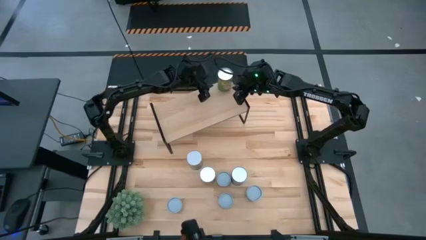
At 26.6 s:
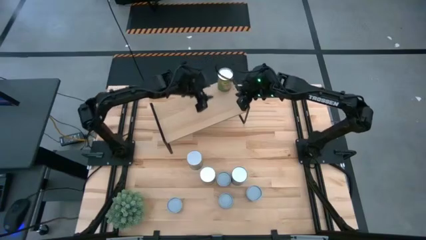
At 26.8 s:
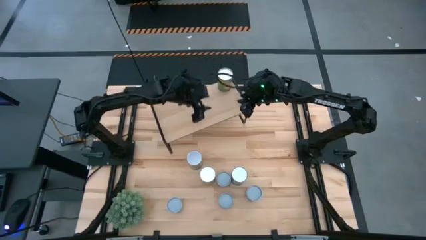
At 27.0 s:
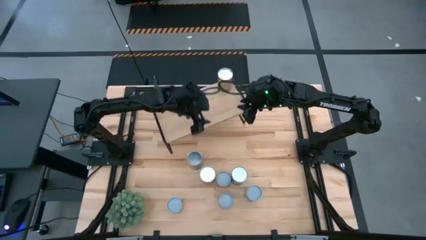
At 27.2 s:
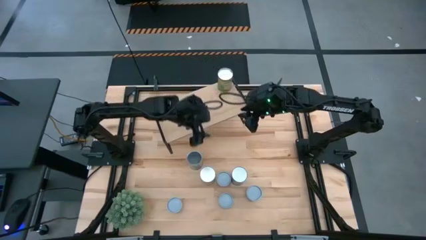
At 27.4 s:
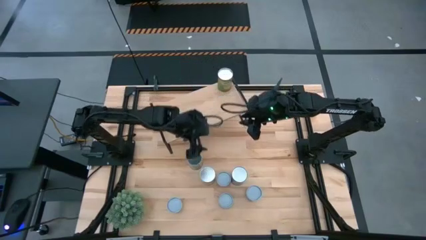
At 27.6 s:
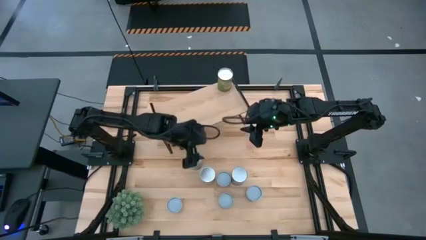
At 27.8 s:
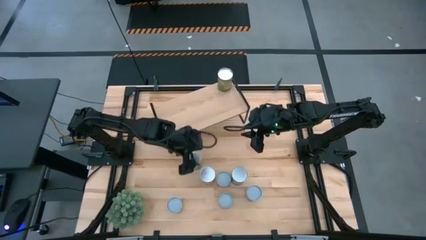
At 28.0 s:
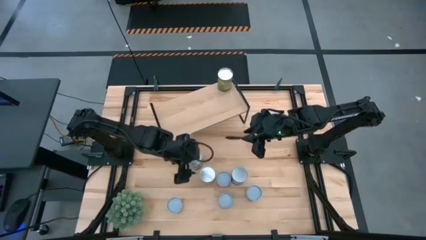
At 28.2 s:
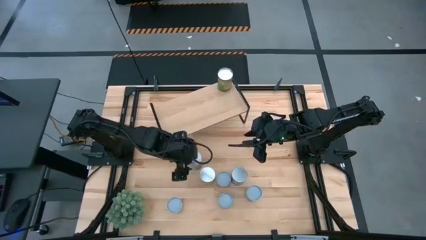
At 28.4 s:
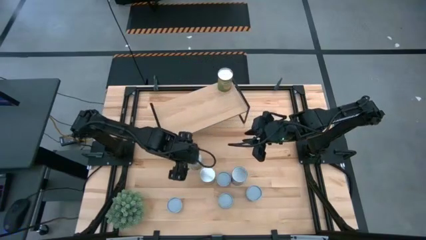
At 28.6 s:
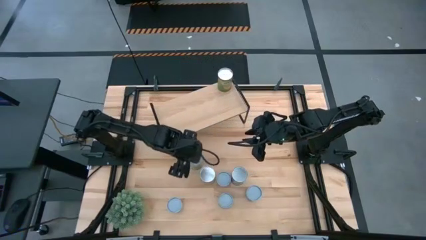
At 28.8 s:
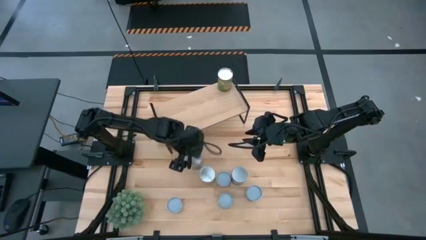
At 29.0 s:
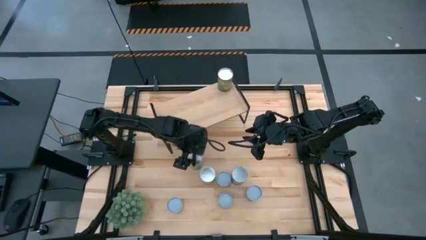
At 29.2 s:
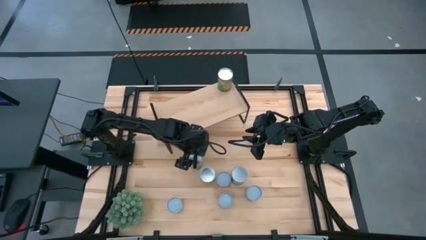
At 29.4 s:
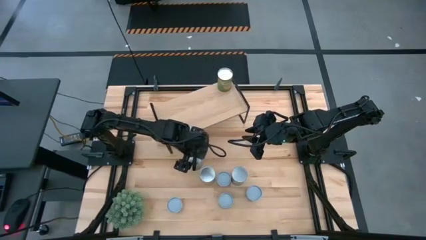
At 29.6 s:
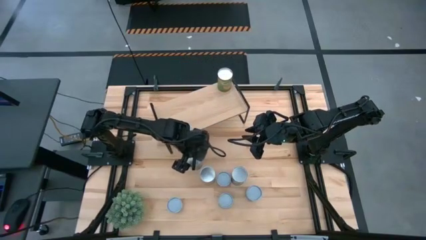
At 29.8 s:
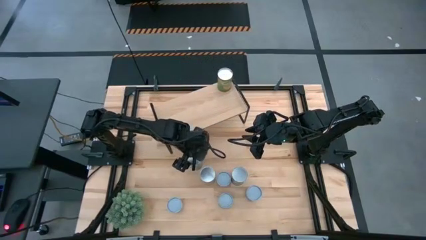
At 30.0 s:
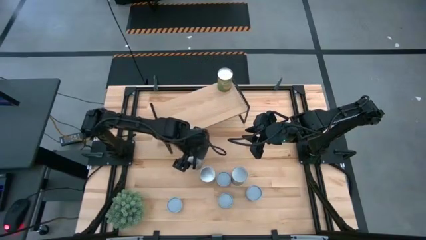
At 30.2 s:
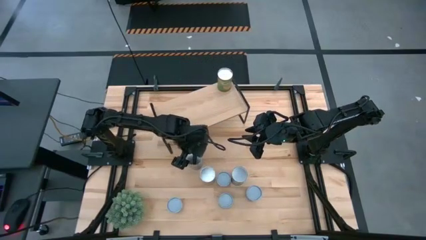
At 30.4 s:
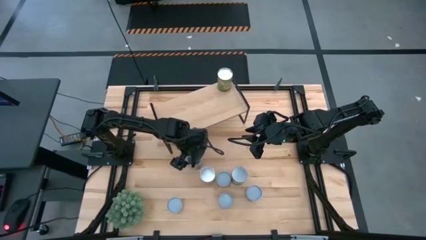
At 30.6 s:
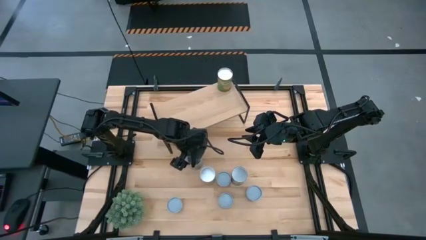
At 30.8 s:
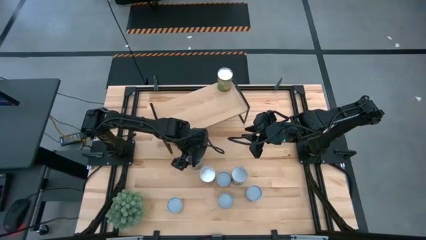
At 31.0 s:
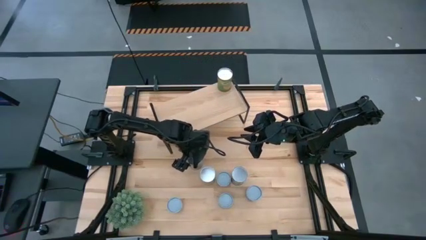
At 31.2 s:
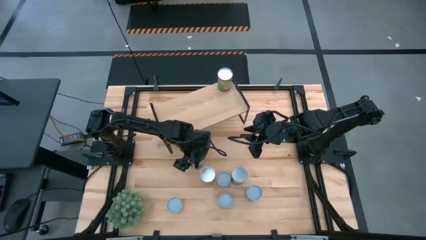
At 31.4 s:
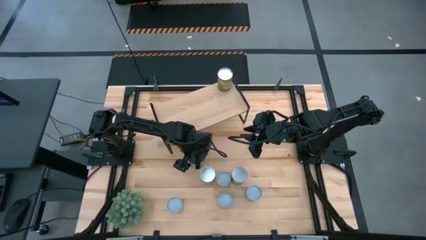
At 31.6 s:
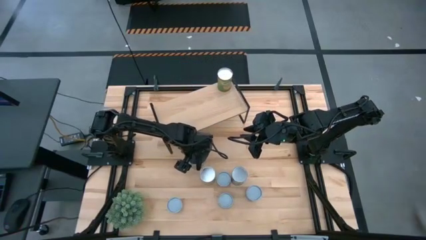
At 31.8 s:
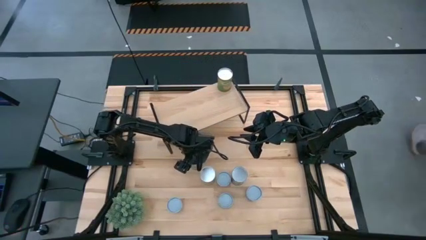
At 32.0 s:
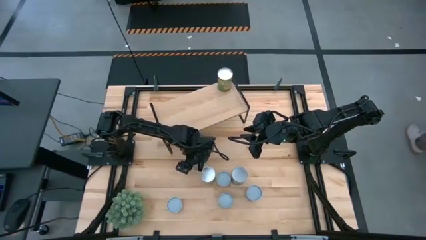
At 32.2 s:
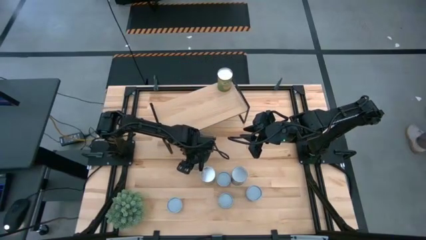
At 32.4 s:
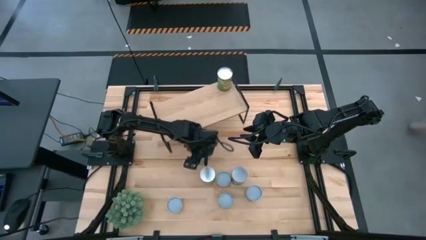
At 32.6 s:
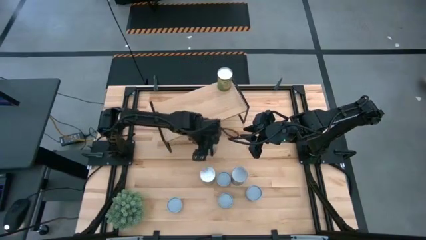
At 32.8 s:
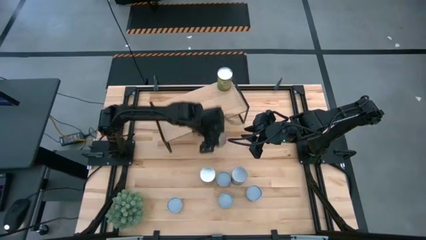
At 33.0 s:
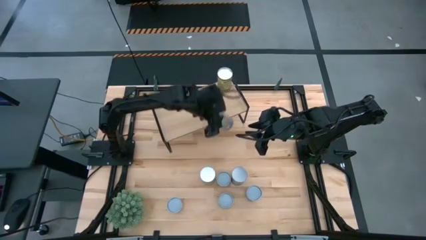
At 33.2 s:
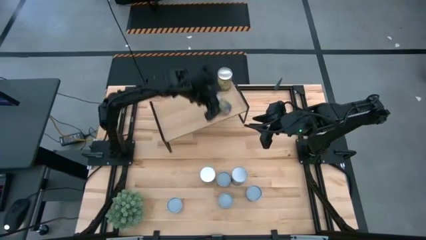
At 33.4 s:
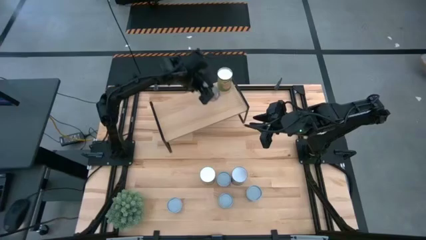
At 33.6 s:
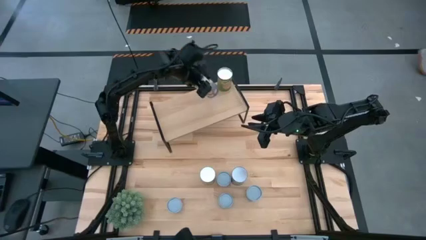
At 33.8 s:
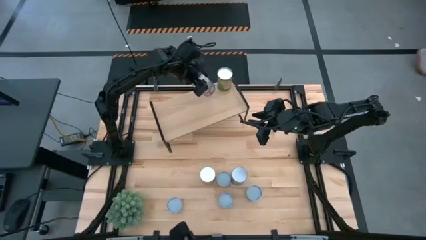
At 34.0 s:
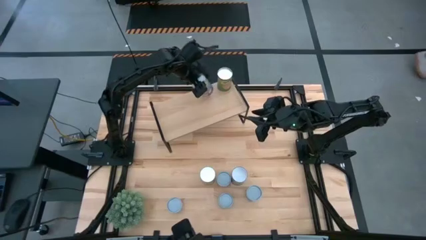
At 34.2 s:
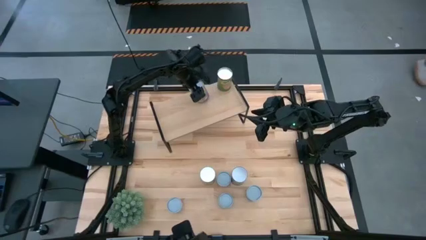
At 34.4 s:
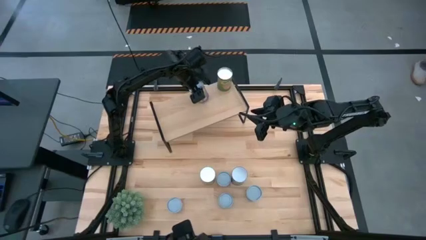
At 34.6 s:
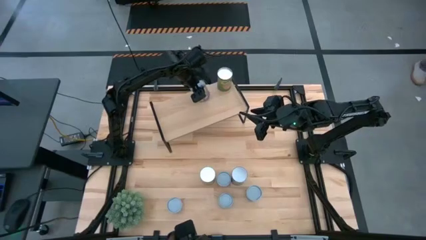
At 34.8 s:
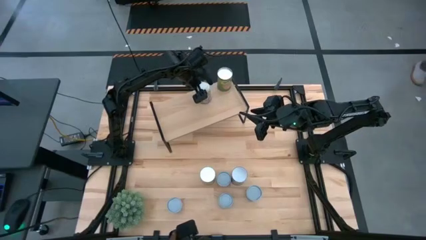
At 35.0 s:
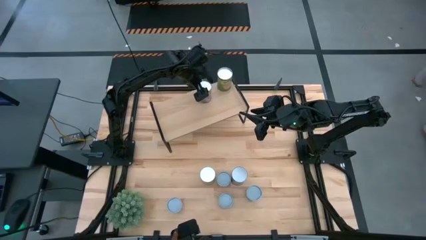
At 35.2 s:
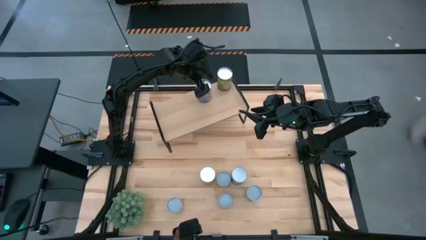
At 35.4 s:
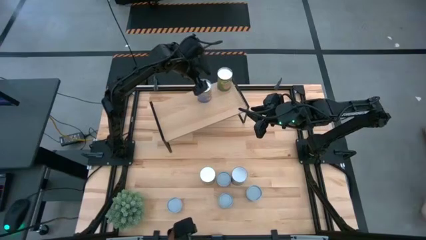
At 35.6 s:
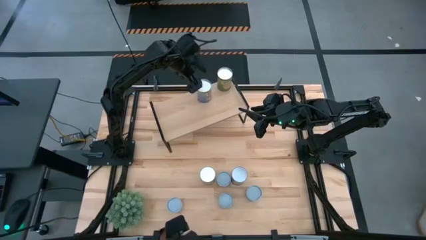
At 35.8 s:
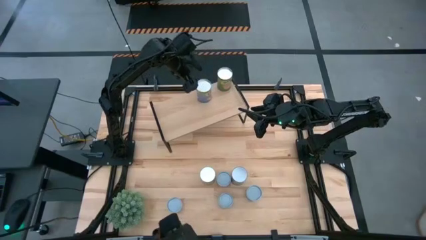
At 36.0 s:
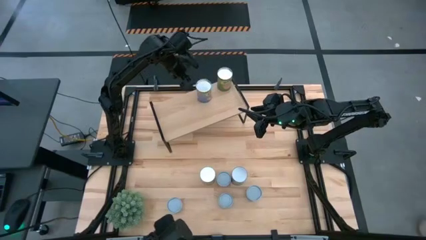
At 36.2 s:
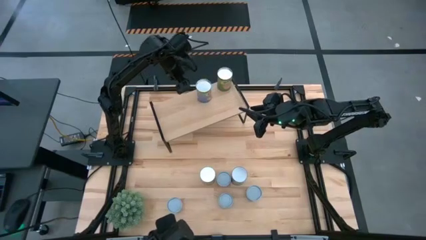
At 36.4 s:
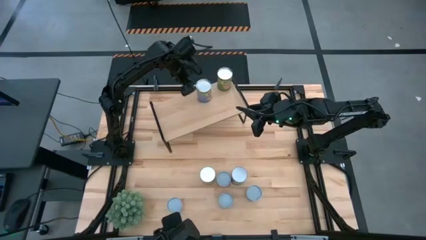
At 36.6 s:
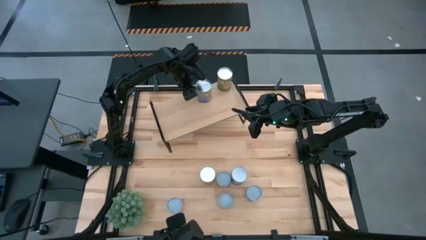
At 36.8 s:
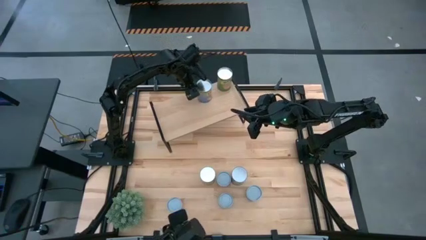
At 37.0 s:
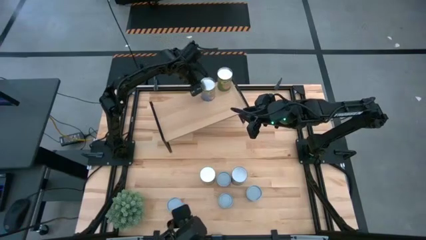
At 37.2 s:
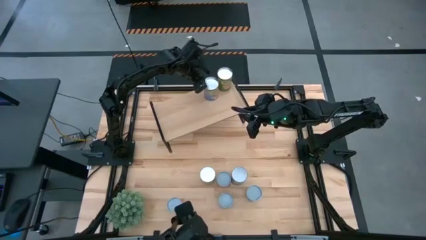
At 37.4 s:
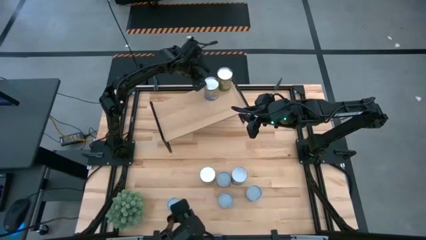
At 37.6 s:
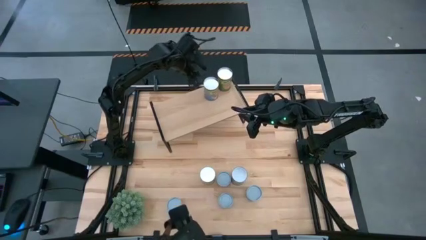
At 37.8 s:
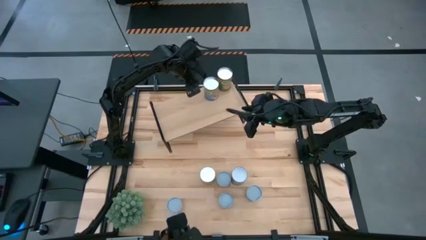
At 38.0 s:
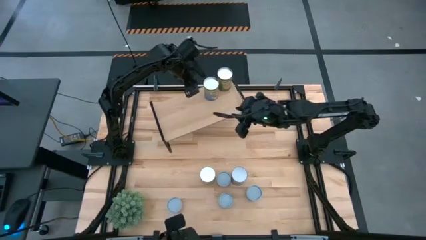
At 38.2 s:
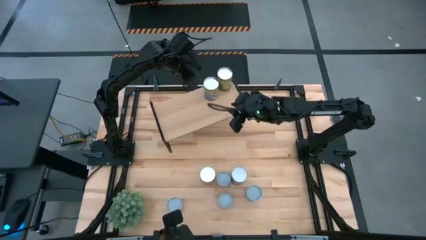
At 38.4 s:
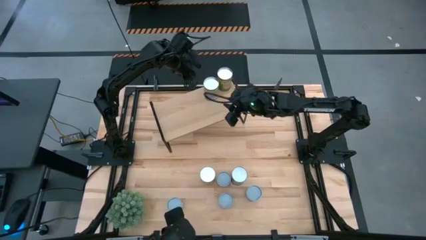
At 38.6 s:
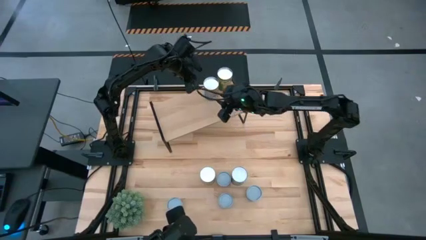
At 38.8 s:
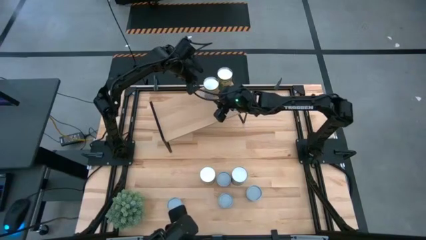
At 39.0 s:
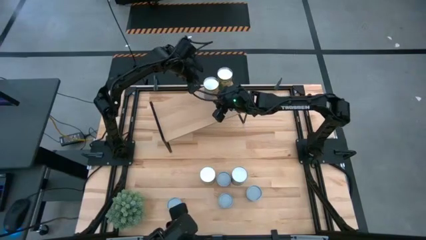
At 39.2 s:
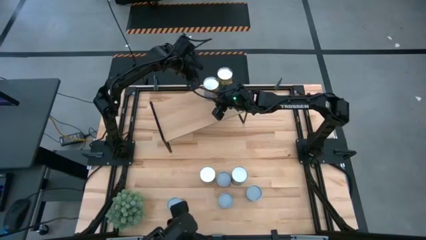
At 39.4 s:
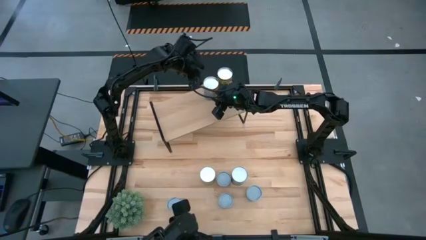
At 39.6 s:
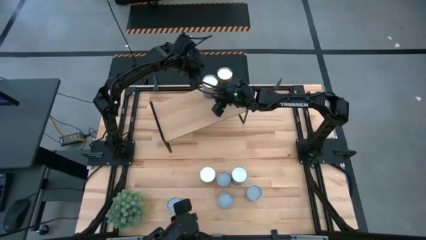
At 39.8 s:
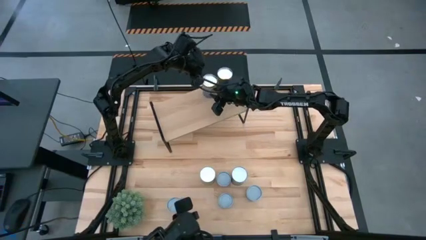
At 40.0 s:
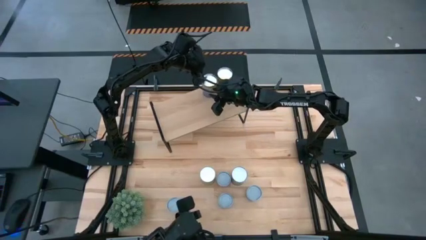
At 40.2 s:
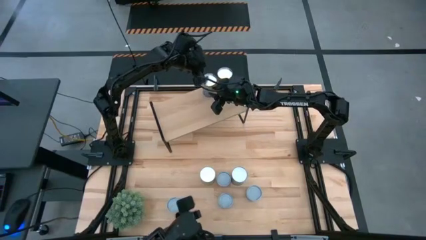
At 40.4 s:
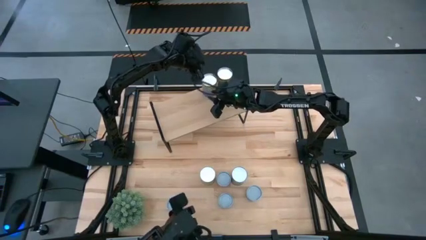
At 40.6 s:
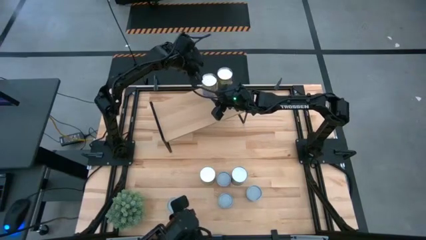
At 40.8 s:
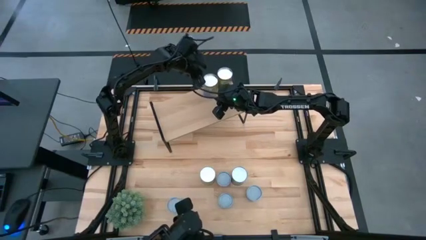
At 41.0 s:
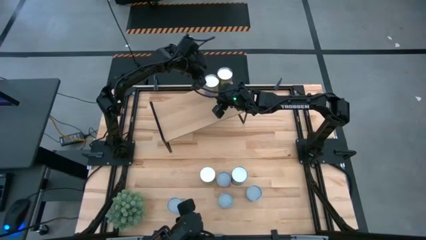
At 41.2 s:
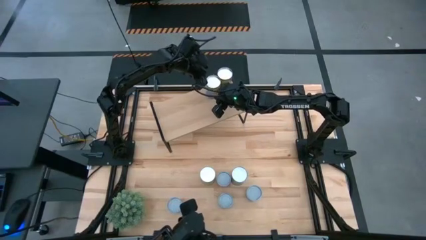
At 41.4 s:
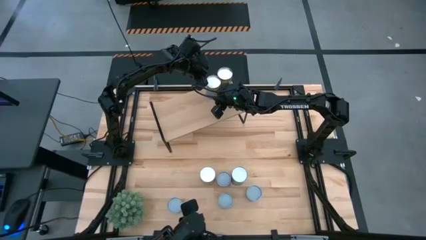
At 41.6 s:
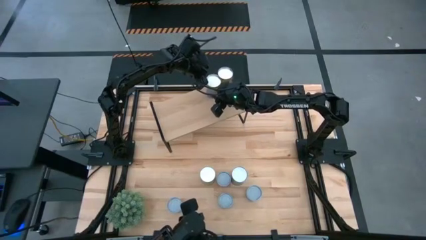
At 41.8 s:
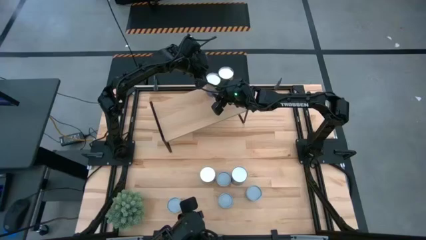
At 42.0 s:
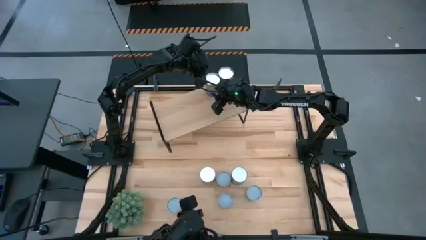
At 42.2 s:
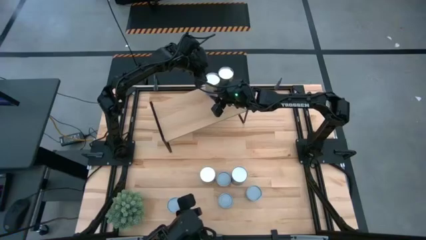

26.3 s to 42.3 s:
Task: Pick and place cans onto a shelf
Put the canned peaches on the shelf
